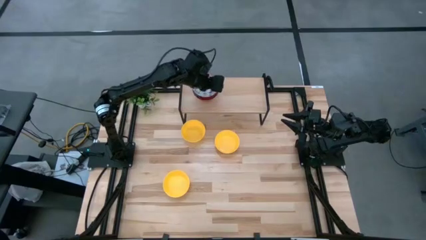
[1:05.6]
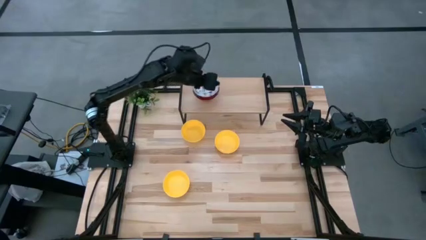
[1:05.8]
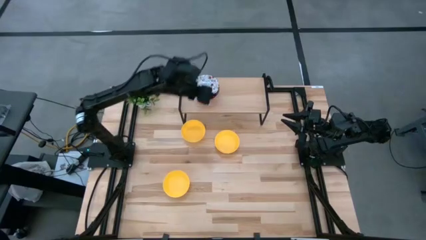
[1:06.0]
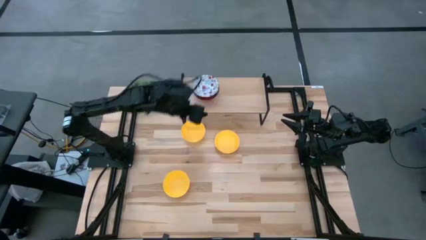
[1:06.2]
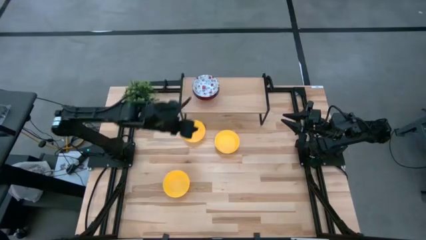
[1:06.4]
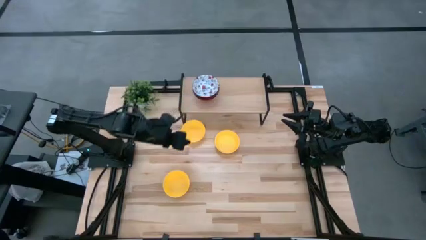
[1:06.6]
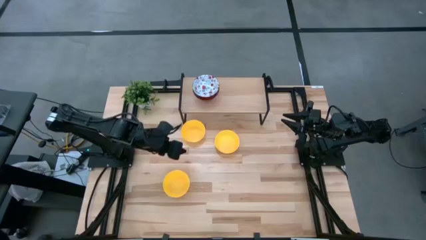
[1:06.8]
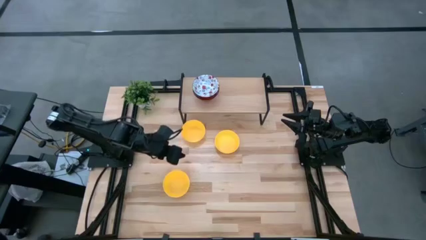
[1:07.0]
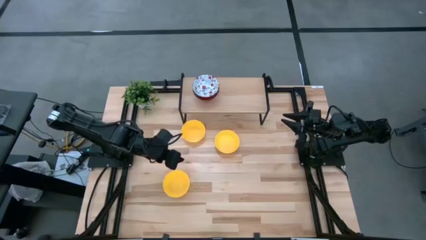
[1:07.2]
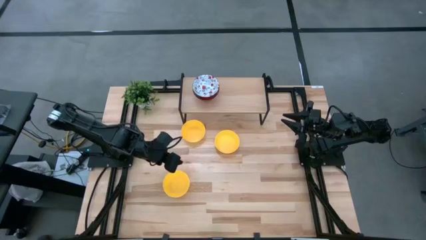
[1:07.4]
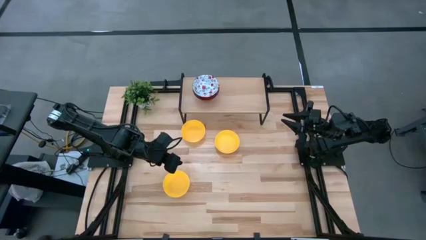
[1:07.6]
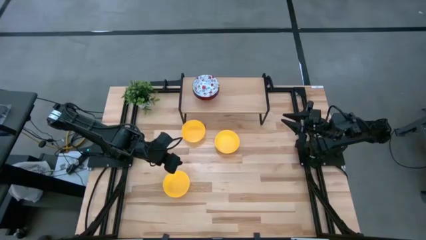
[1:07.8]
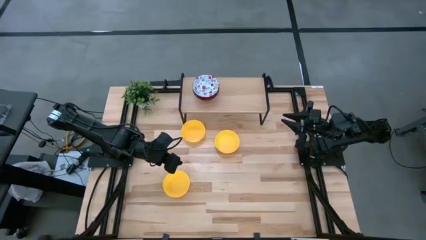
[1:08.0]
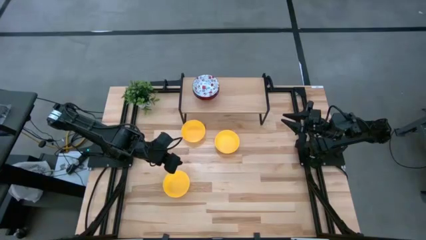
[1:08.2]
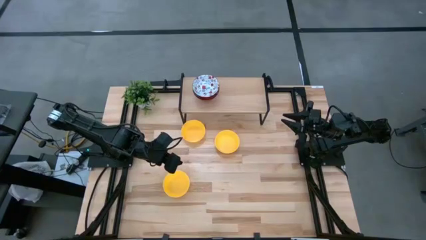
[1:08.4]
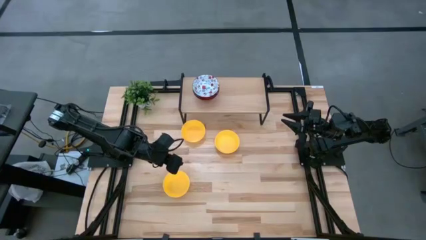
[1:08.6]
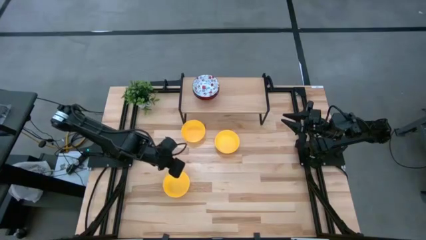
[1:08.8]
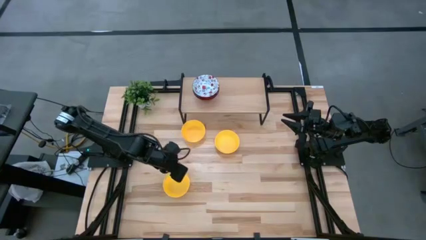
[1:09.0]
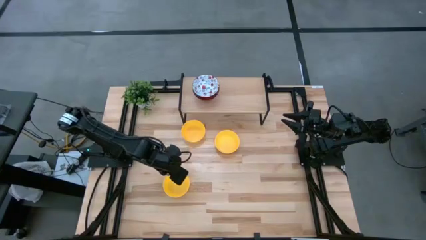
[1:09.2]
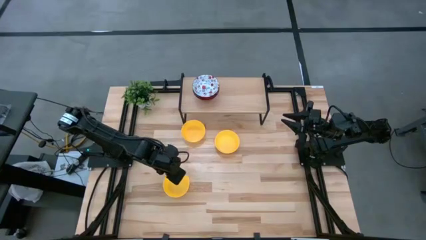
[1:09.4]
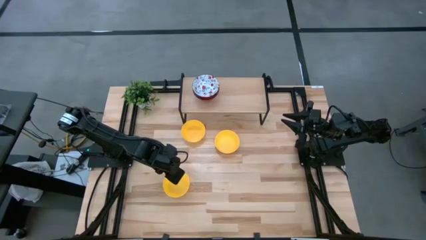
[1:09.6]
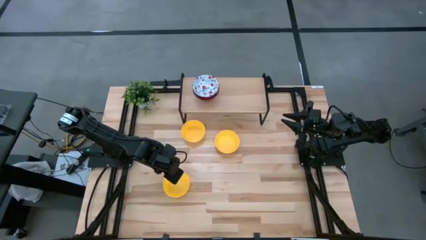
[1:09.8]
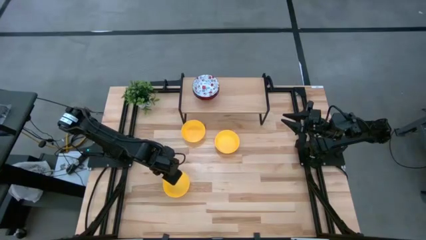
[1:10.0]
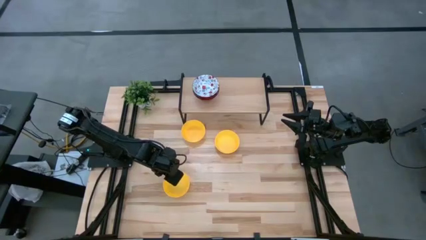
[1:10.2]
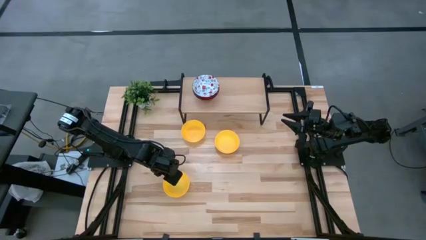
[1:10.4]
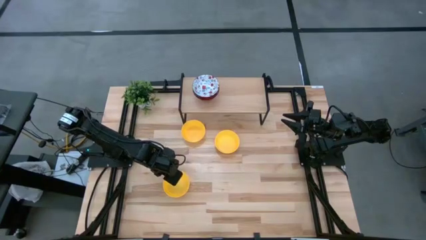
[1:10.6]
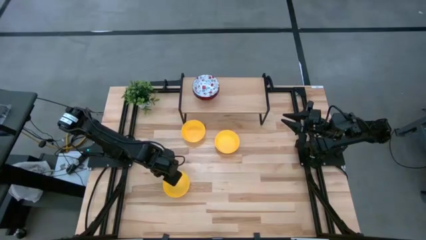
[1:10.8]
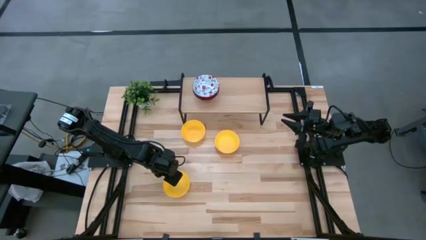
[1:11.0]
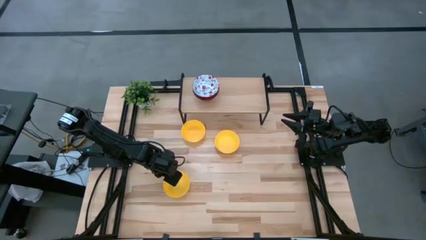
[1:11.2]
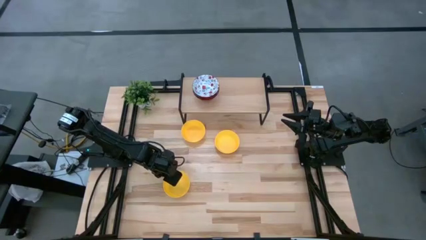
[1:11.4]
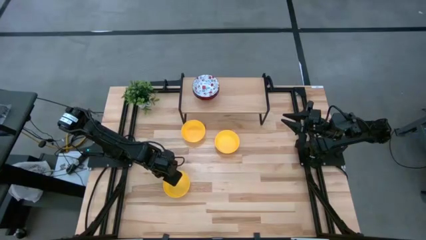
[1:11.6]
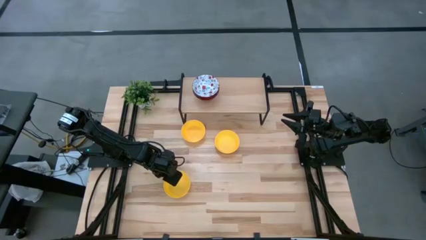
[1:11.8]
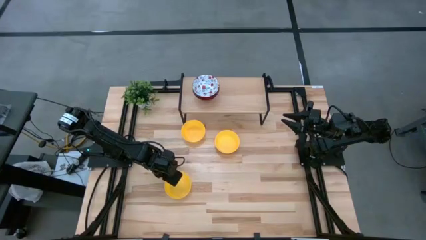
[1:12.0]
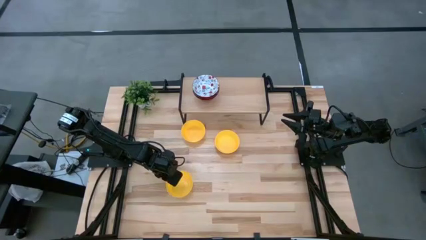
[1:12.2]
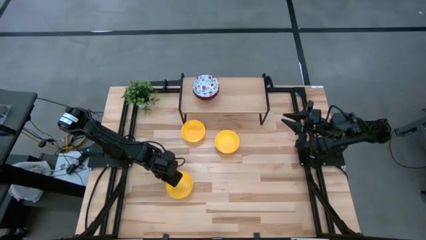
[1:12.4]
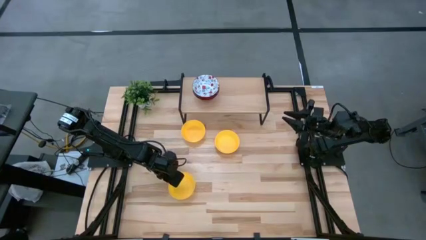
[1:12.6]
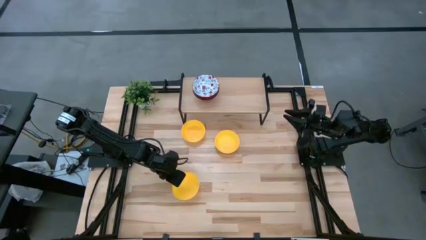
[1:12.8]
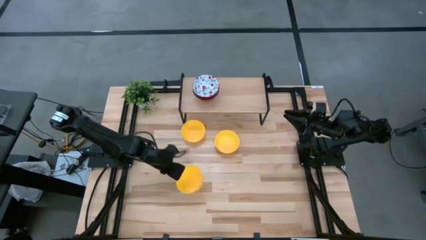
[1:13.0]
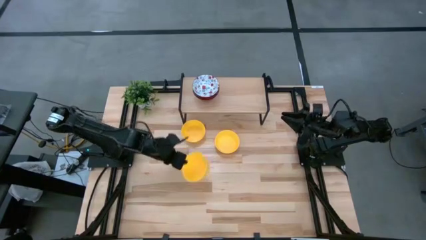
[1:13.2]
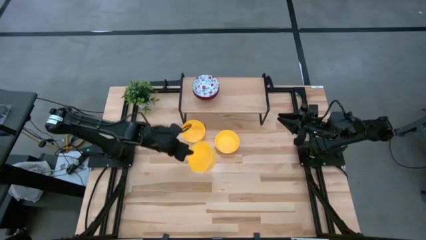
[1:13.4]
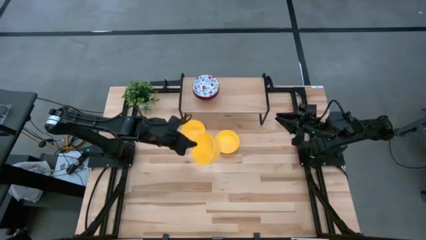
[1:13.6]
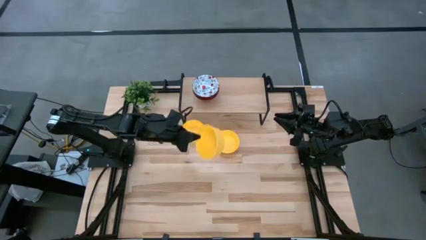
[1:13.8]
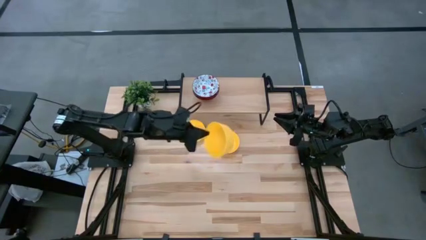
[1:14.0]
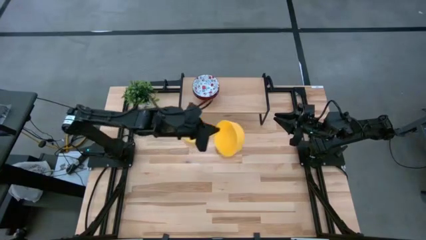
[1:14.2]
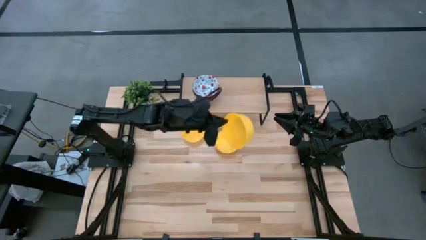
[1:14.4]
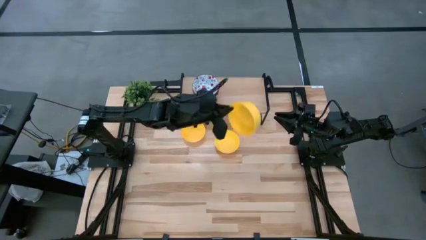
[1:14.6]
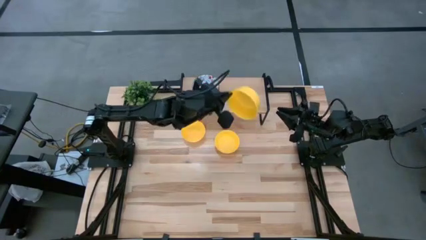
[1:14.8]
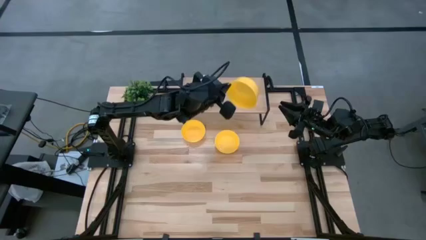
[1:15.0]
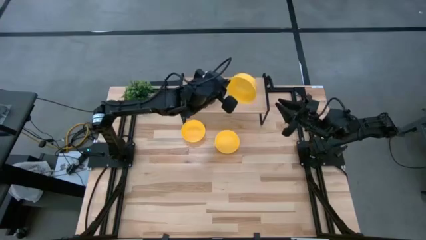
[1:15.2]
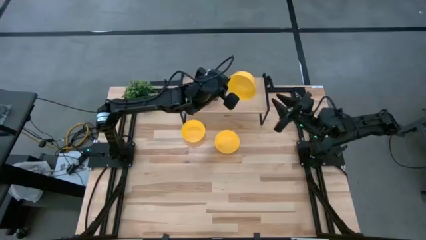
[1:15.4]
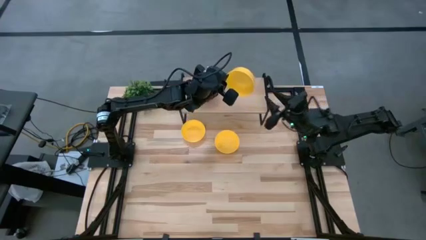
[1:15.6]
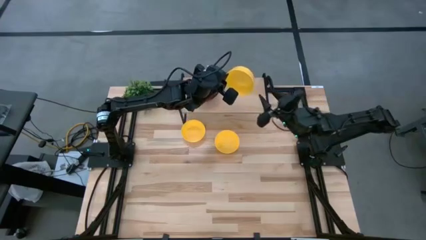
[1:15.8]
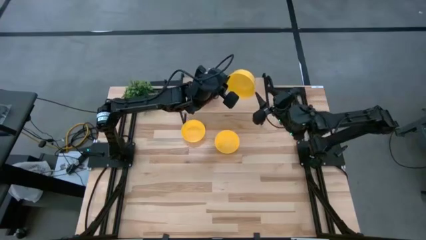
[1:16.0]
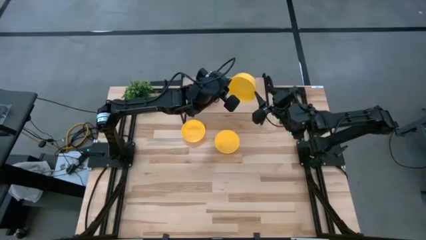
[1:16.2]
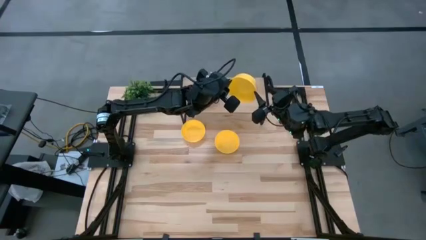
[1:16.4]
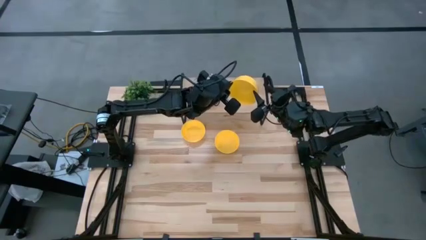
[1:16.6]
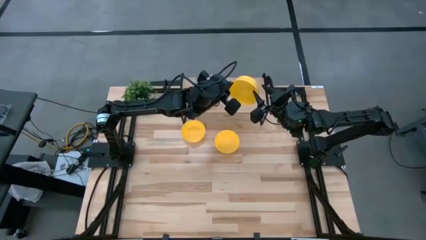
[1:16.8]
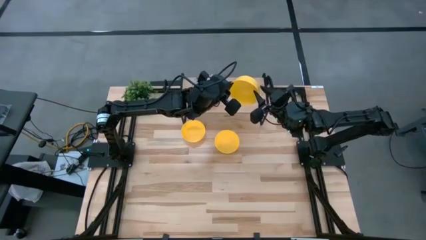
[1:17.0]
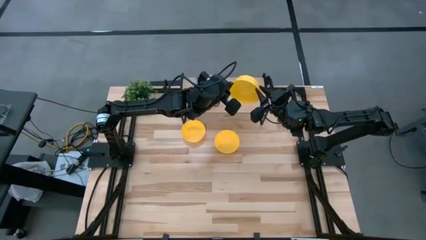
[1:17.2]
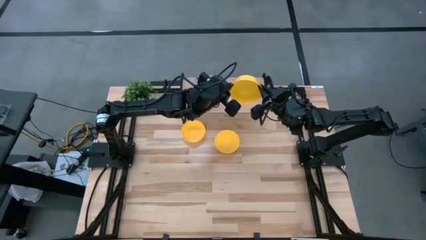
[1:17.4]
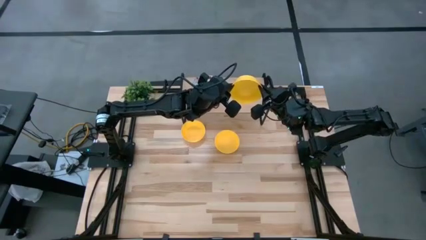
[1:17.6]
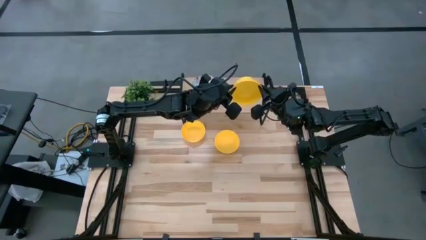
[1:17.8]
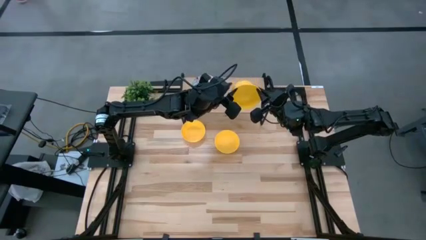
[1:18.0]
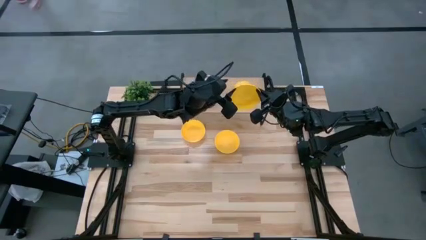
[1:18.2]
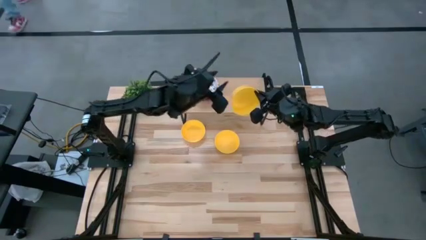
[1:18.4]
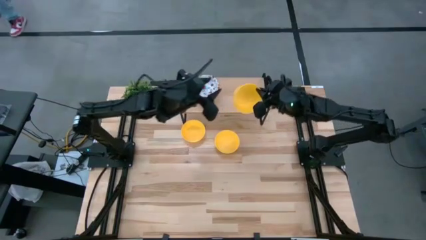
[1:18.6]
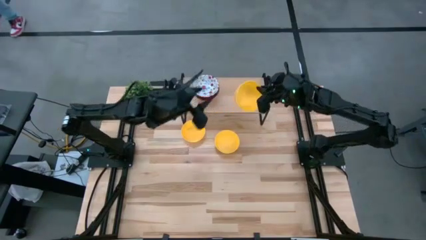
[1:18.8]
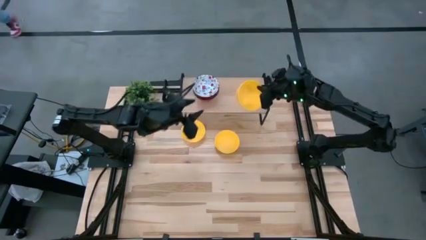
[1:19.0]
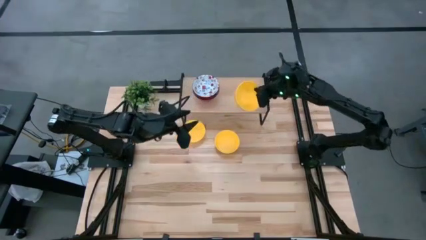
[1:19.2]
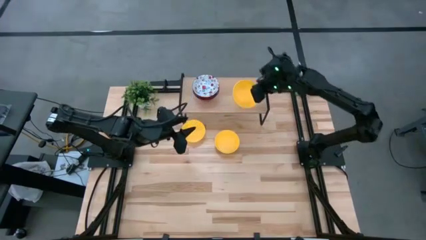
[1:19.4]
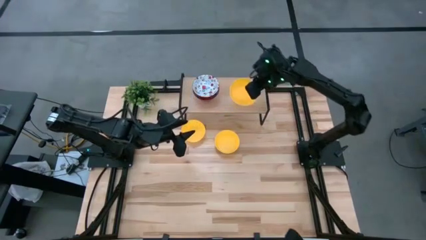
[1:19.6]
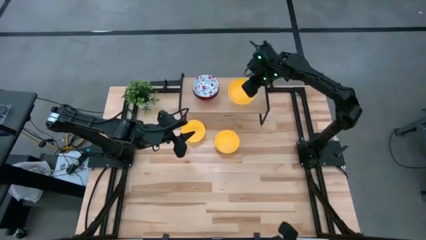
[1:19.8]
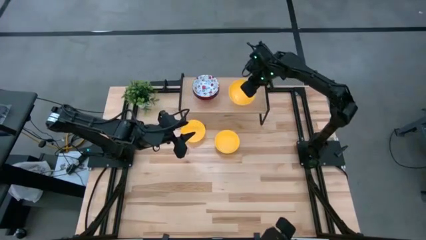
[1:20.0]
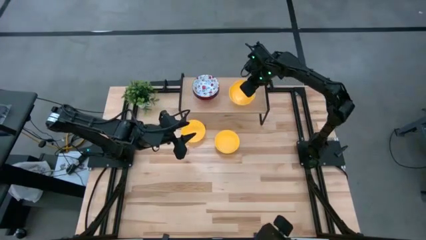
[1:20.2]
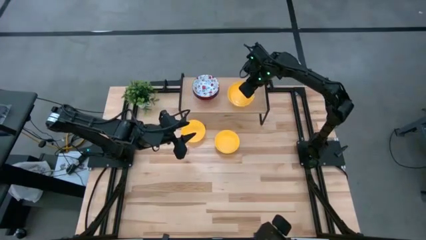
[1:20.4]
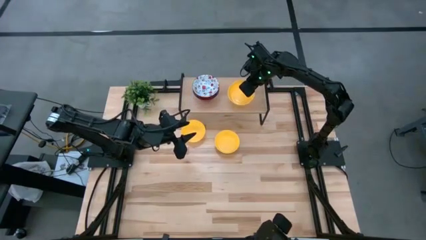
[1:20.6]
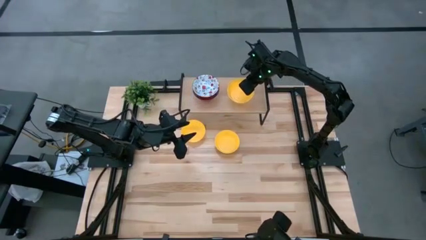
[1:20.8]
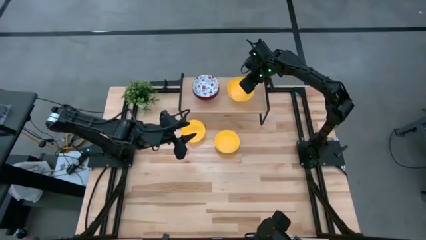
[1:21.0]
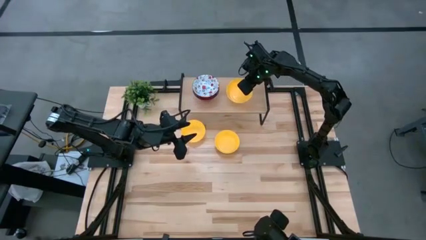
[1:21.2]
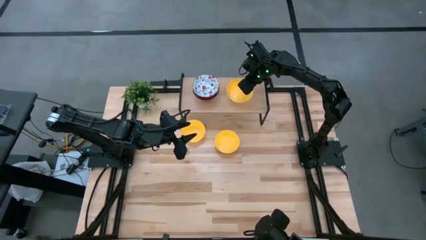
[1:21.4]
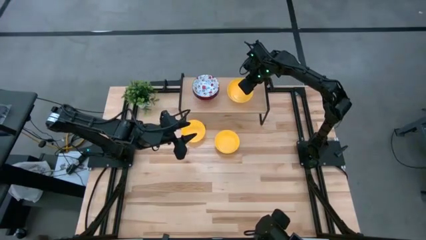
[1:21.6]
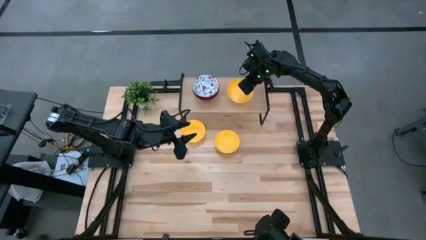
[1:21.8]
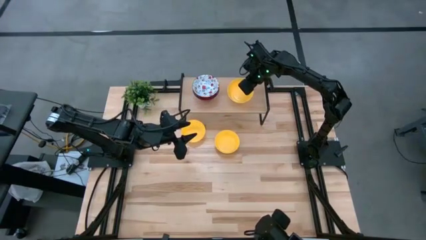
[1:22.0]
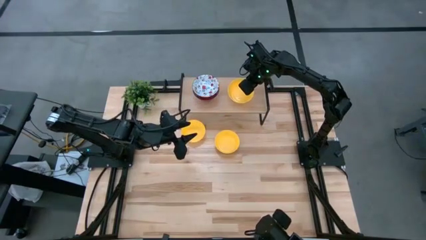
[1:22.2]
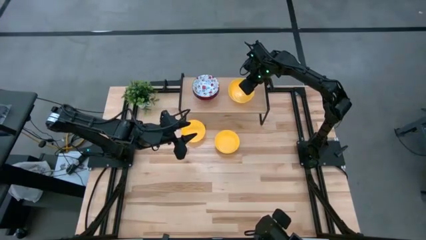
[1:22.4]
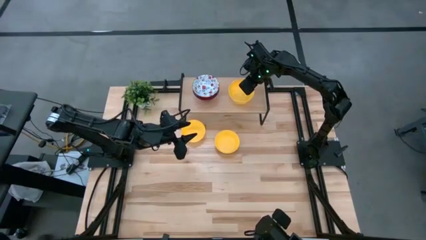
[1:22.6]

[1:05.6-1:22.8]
Task: Pick & Place Mini bowls
Put the bottom yellow bowl on the shelf
